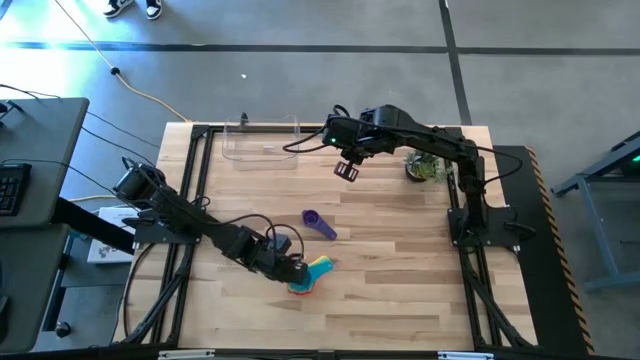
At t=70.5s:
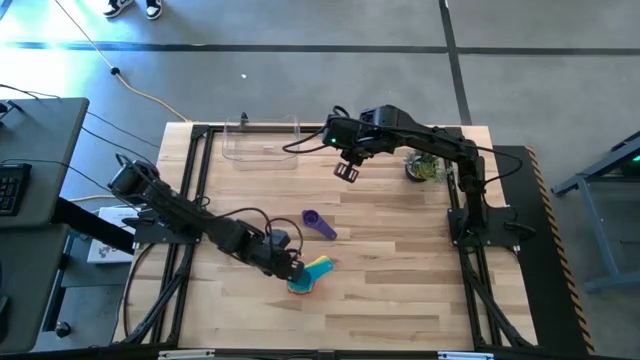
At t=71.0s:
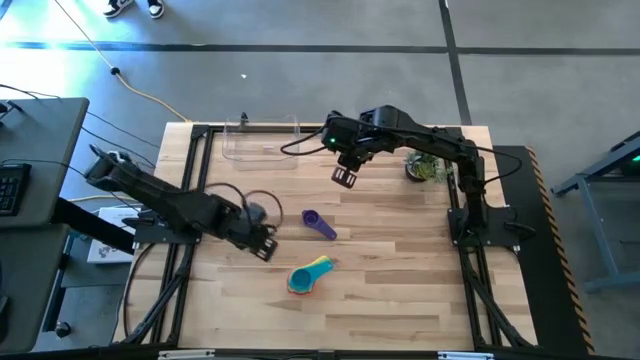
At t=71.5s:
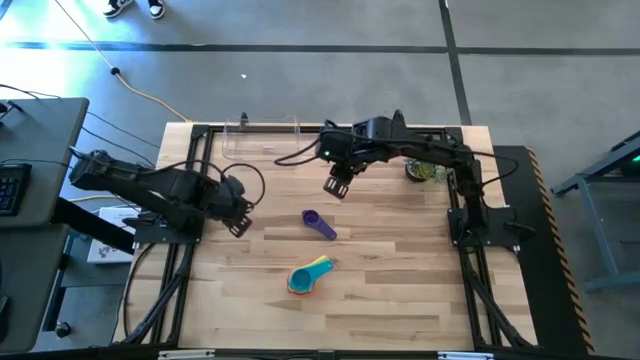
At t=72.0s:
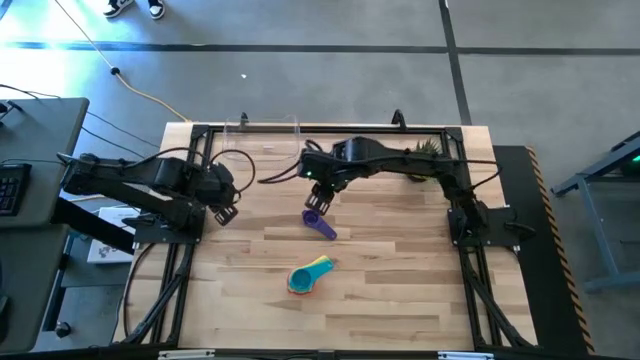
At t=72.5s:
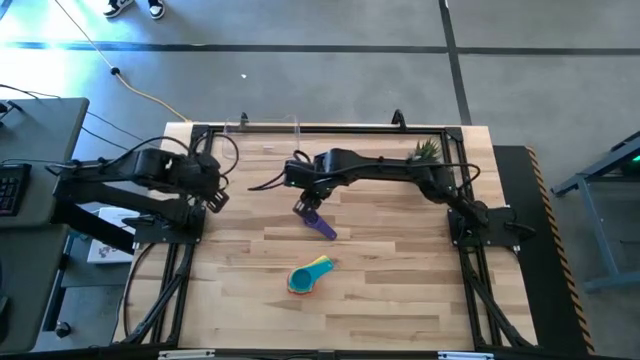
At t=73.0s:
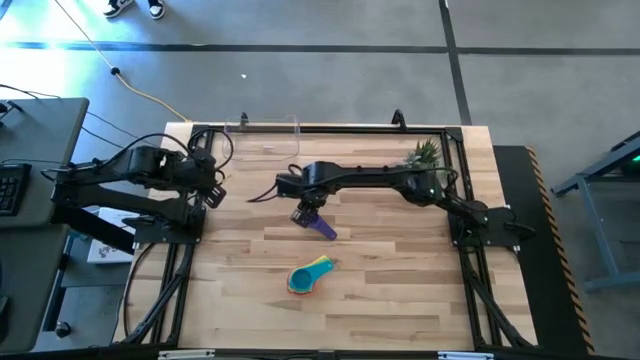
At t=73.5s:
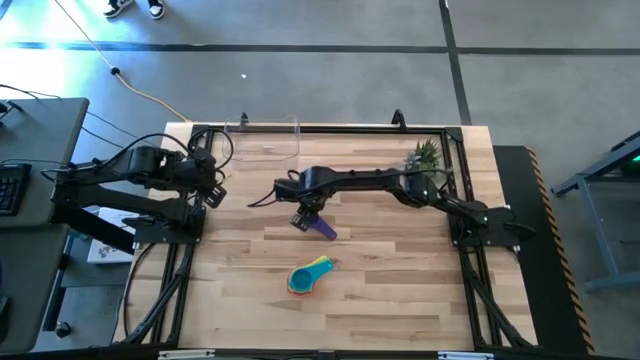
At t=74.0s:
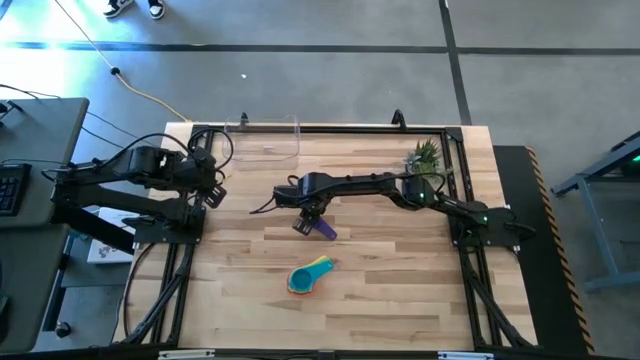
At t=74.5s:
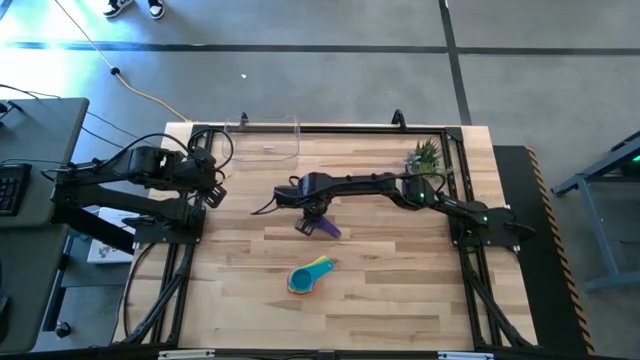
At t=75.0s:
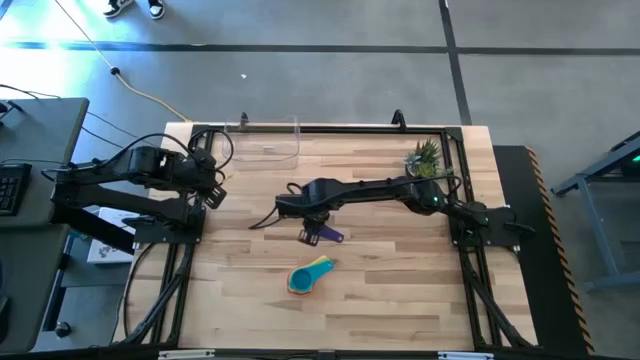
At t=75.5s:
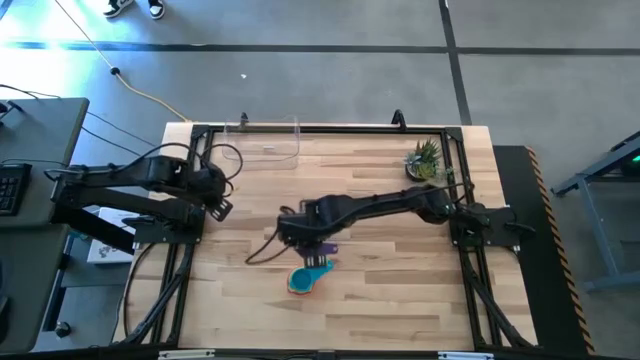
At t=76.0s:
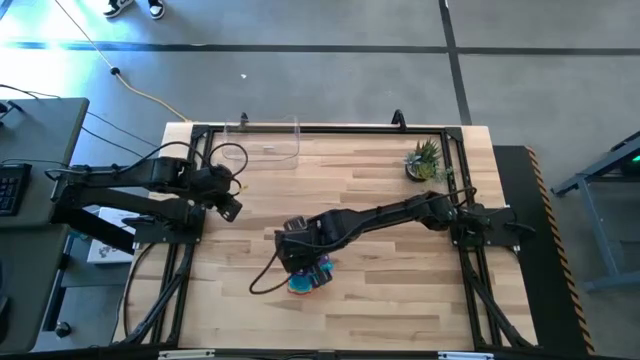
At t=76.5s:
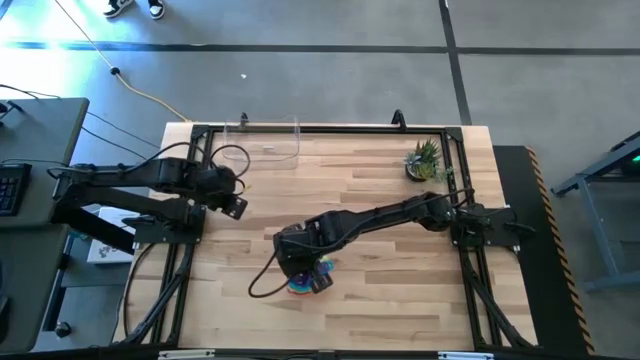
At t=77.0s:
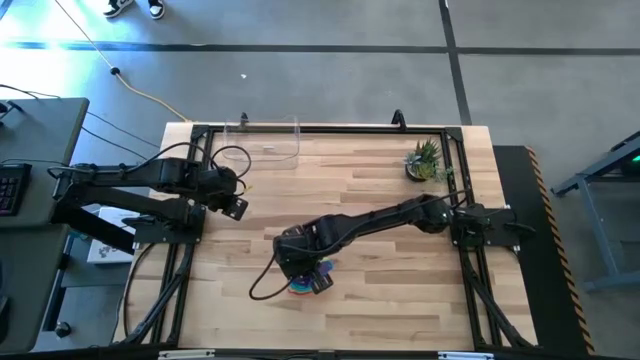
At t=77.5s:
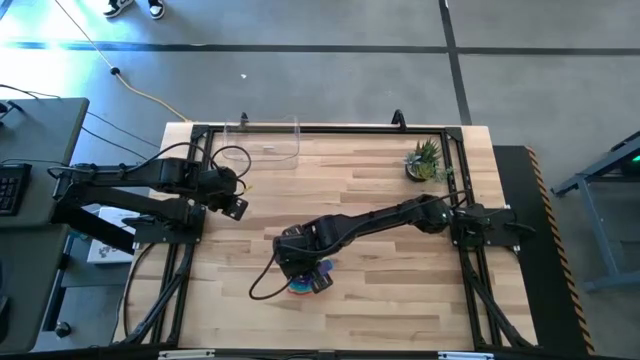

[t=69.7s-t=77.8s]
Task: Nest measuring cups in basket
Stack the dark blue measuring cup on the light blue measuring cup

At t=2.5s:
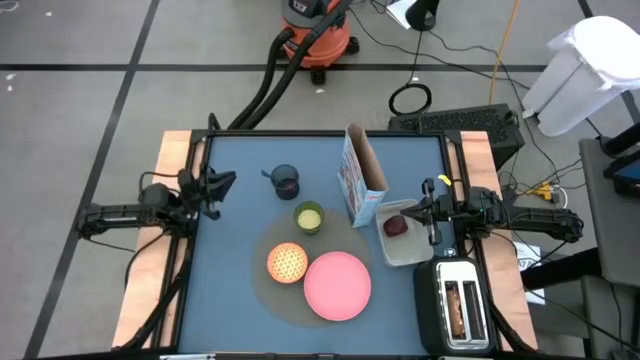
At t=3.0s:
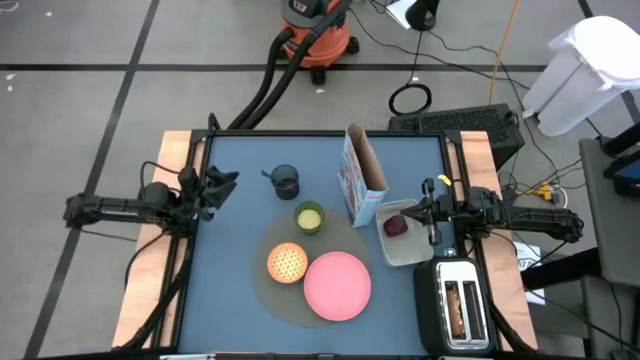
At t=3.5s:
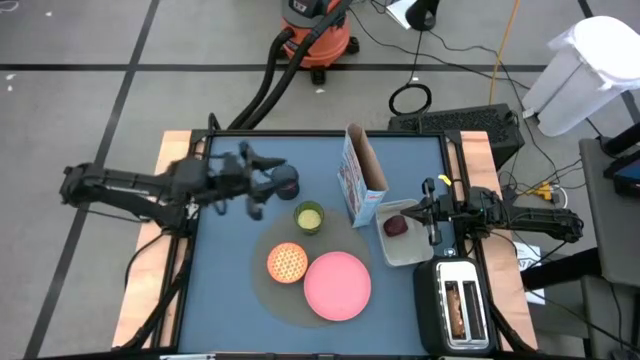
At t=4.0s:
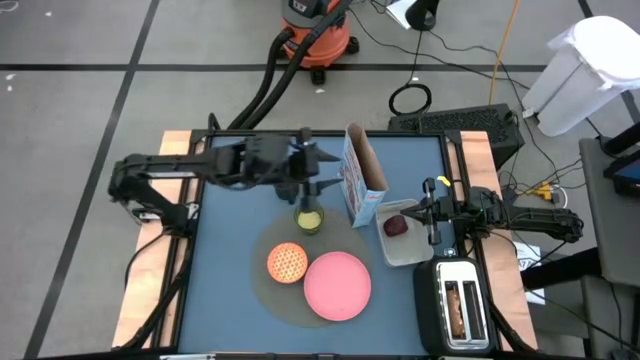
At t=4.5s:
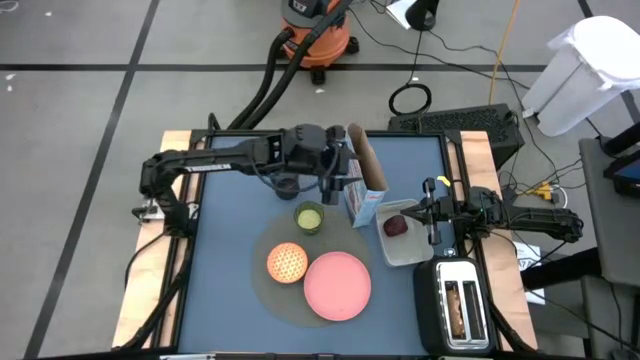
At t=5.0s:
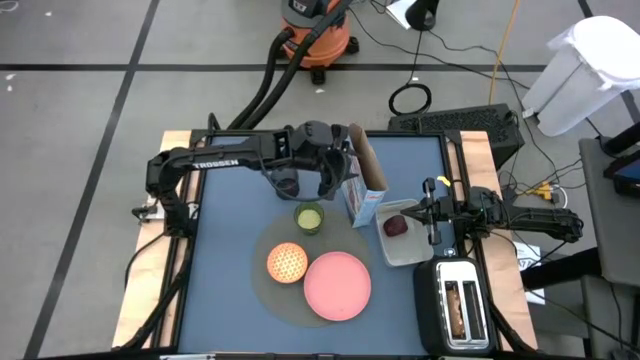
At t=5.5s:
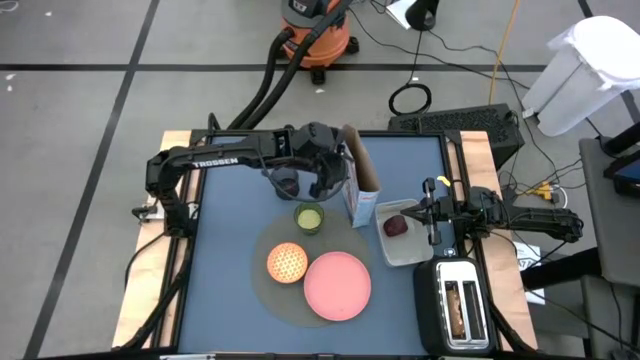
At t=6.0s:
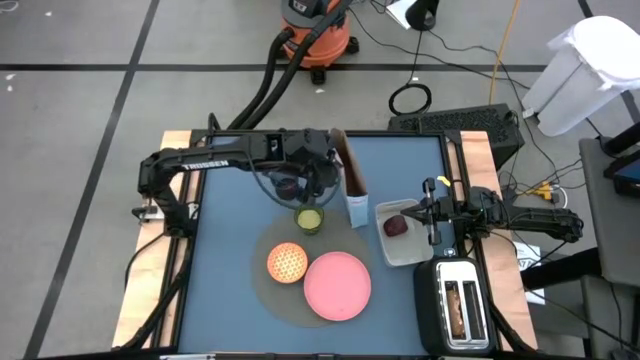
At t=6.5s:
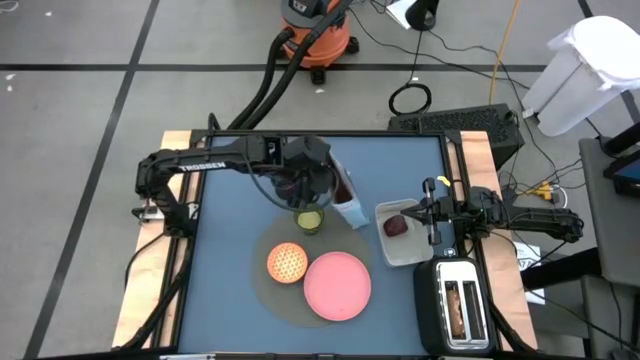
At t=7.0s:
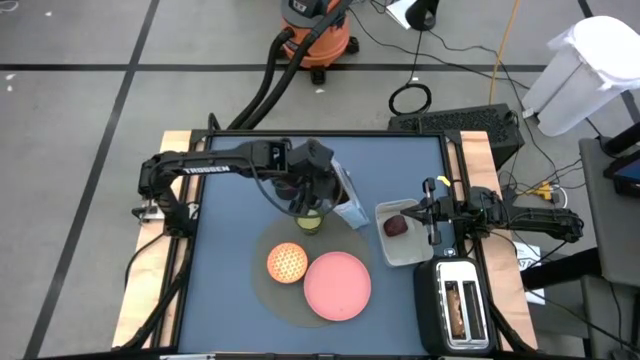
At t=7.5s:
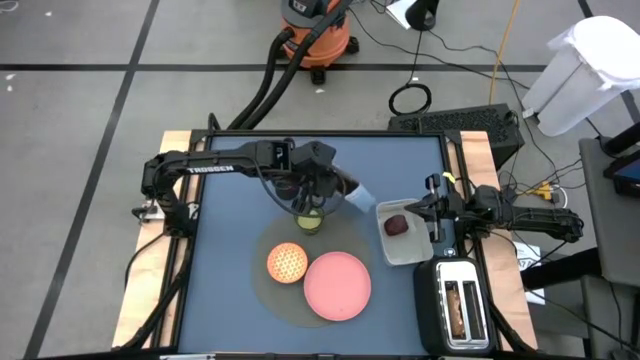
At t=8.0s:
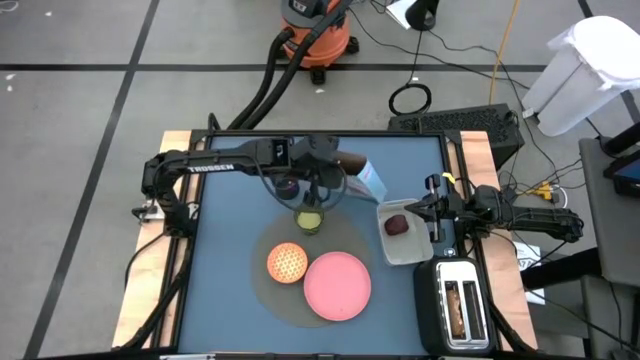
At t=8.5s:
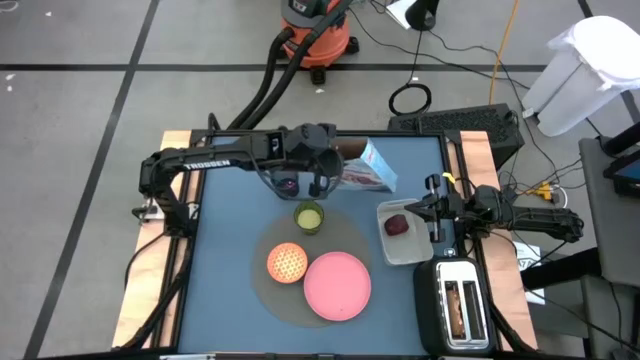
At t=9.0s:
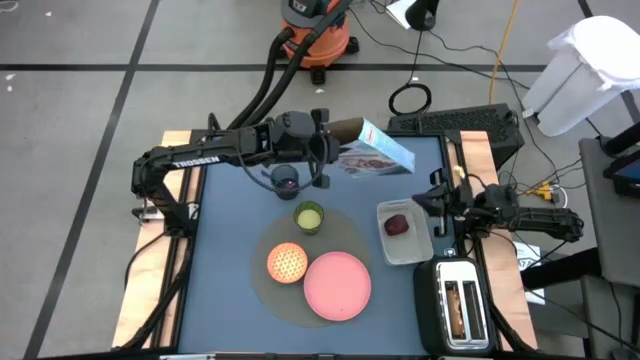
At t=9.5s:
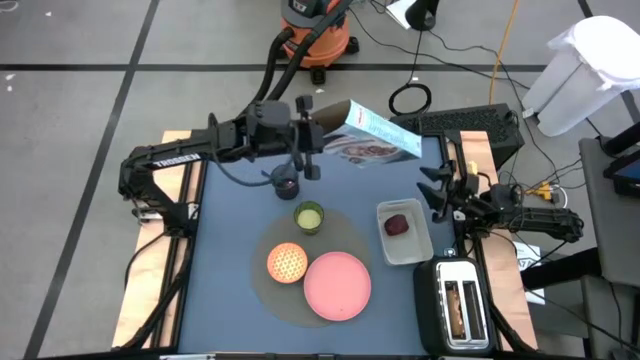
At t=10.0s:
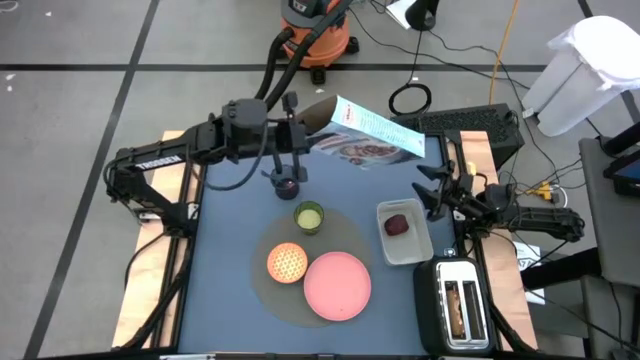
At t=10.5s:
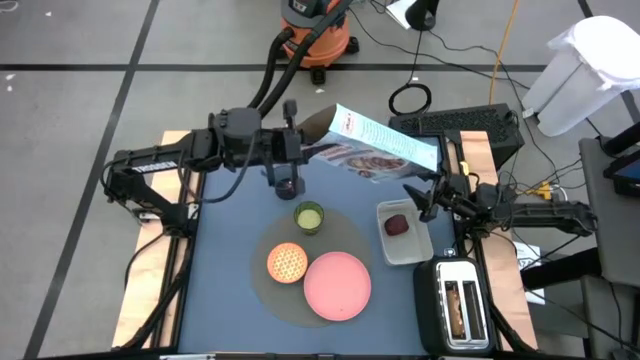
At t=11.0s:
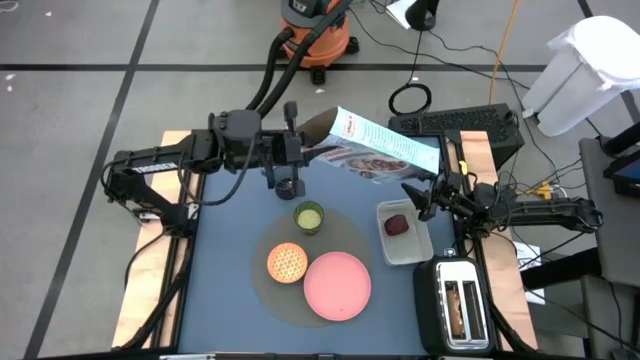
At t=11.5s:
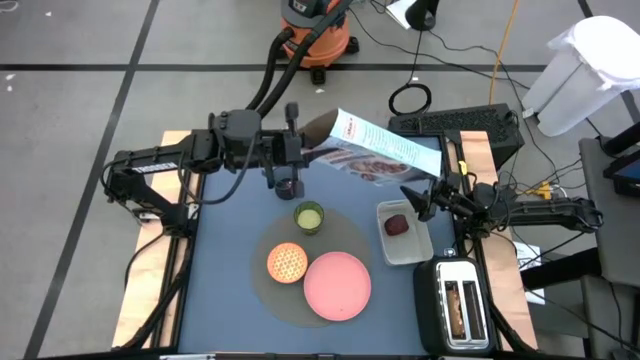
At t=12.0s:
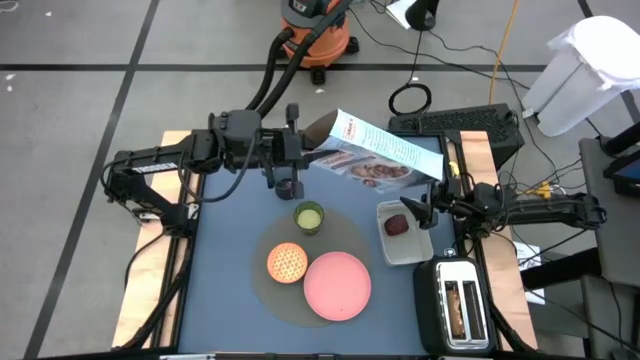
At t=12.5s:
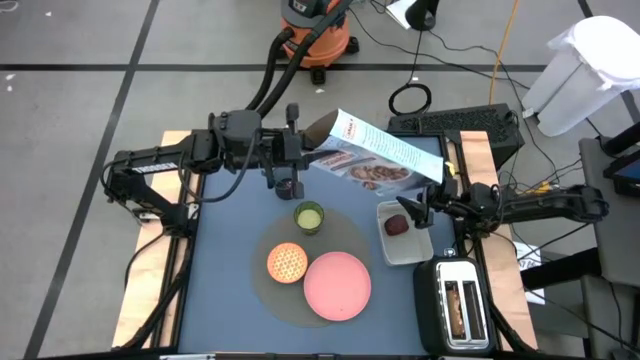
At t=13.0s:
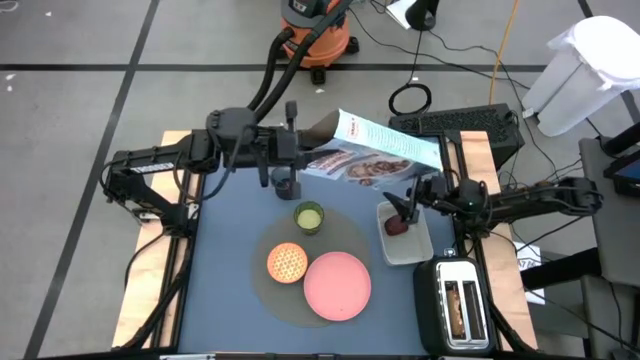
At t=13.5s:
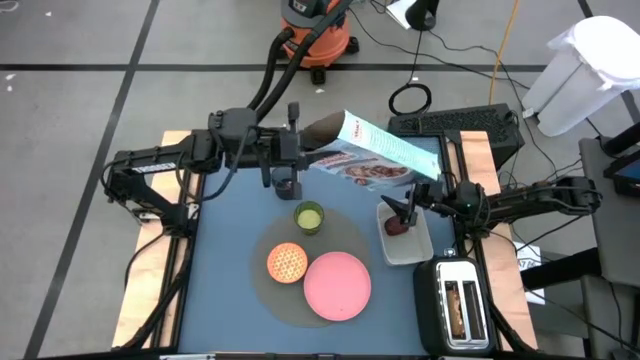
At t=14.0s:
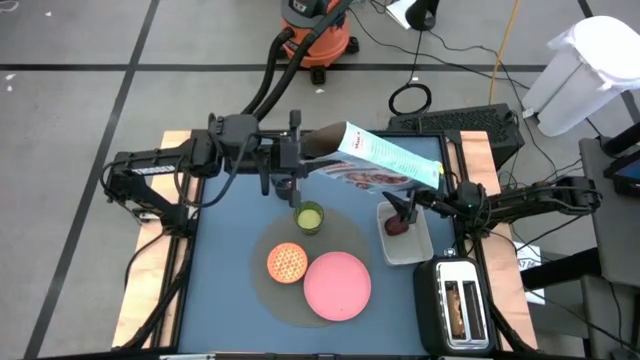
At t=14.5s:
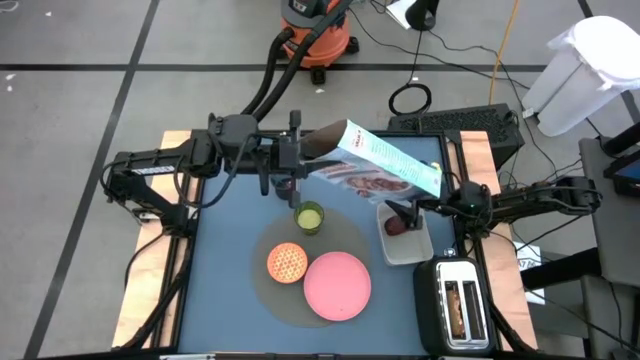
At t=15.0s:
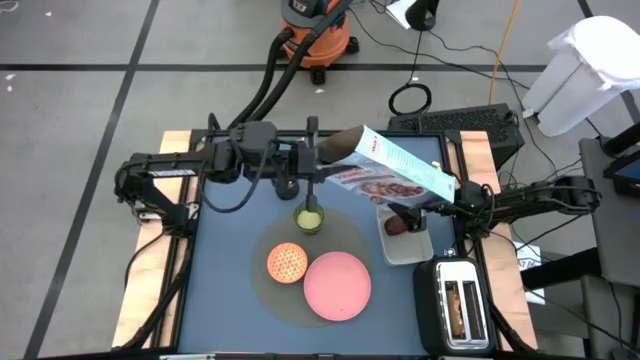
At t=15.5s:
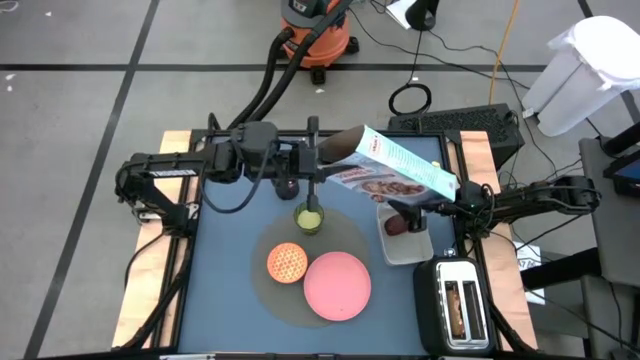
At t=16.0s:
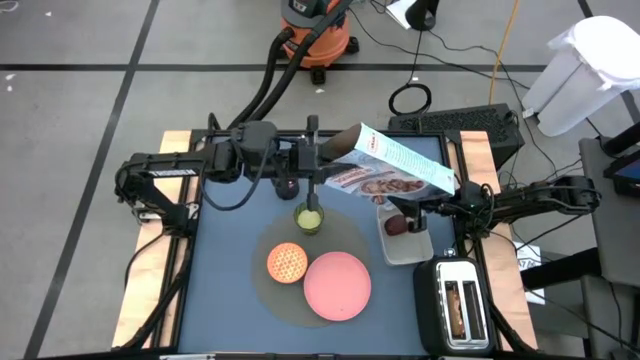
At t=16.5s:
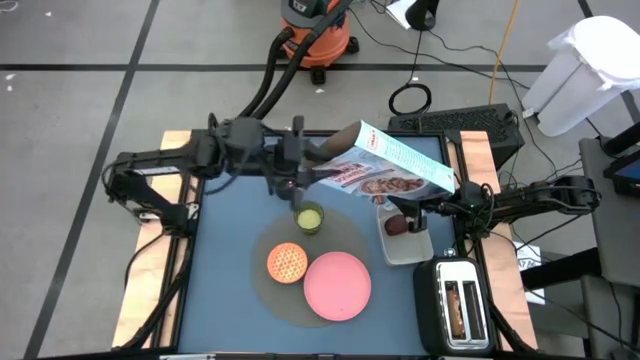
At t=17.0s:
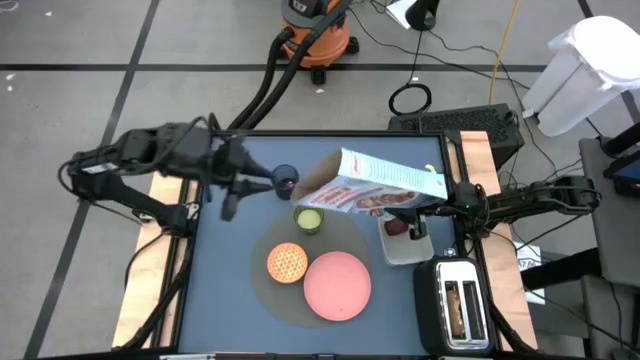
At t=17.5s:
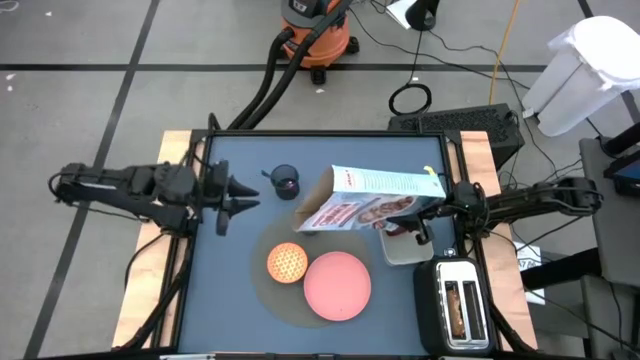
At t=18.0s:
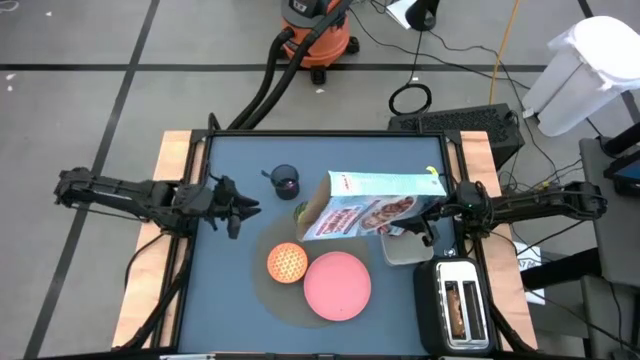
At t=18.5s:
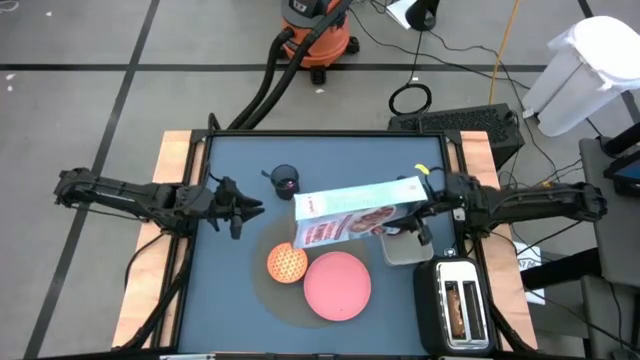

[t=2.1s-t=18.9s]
Task: Arrange a breakfast setting
Pour the cereal from the cereal box into the red bowl
